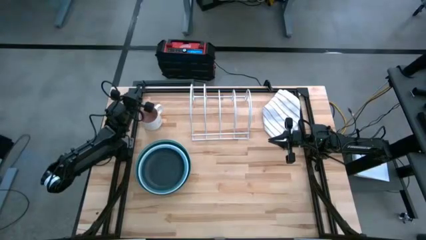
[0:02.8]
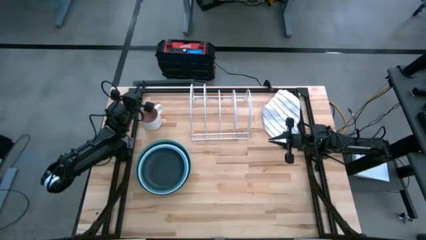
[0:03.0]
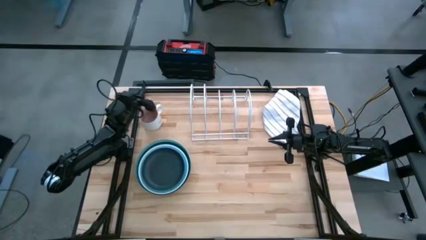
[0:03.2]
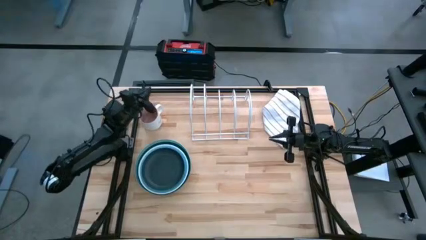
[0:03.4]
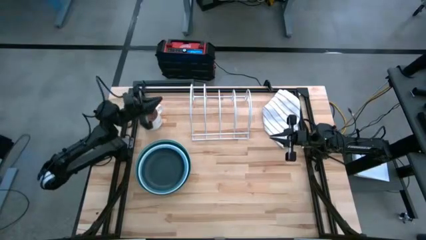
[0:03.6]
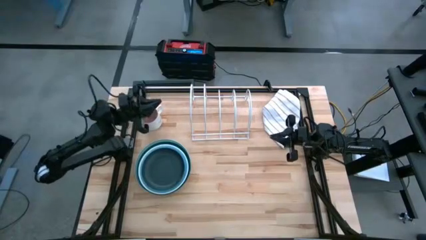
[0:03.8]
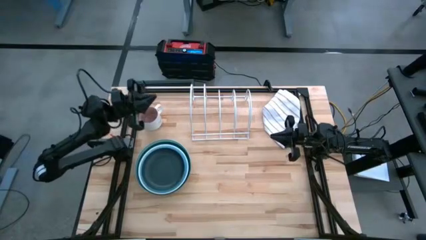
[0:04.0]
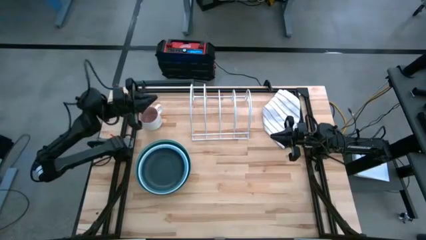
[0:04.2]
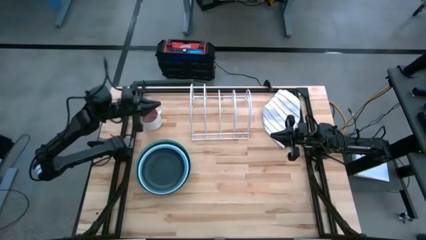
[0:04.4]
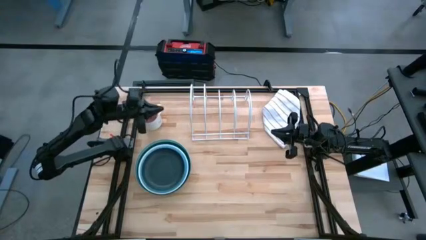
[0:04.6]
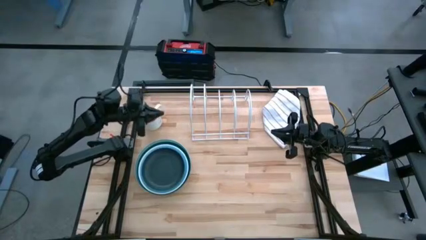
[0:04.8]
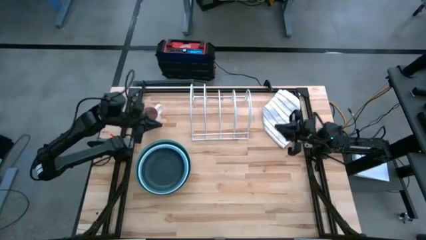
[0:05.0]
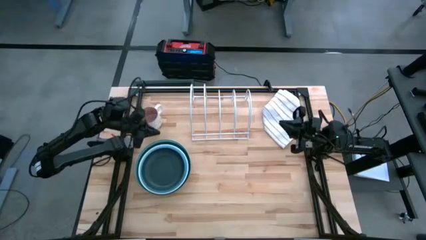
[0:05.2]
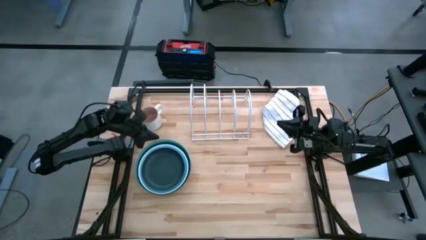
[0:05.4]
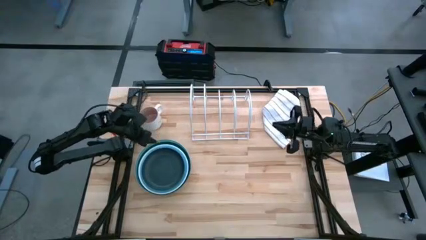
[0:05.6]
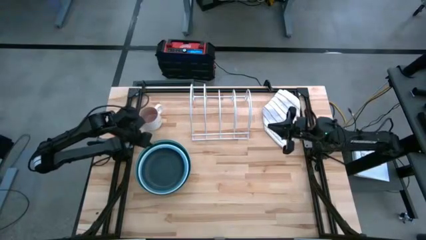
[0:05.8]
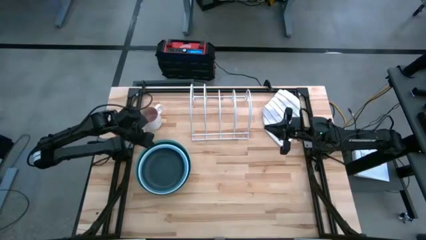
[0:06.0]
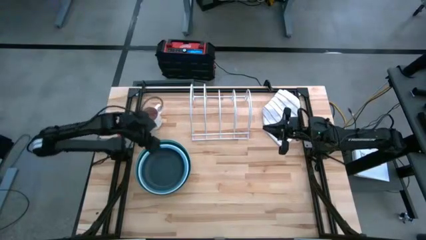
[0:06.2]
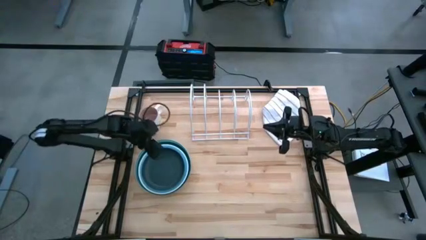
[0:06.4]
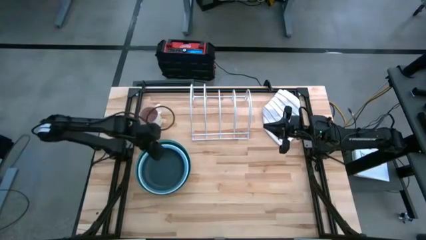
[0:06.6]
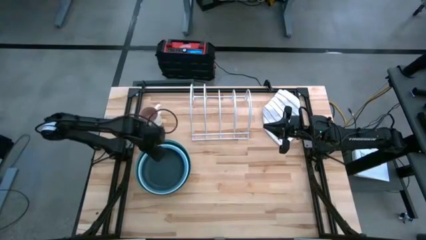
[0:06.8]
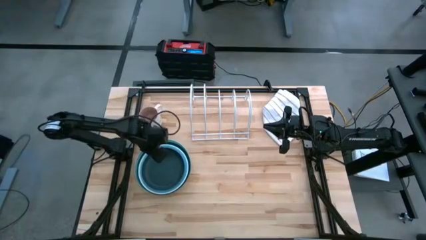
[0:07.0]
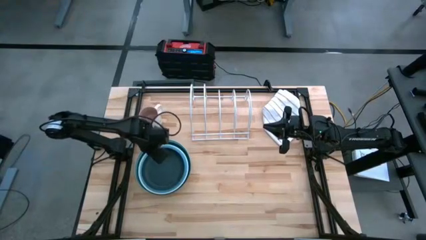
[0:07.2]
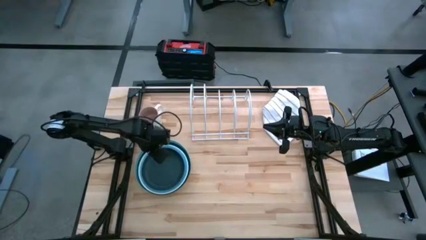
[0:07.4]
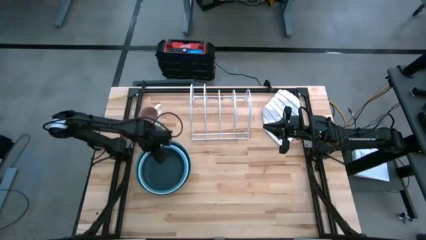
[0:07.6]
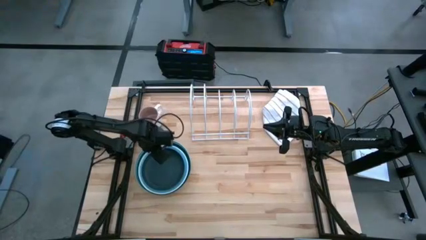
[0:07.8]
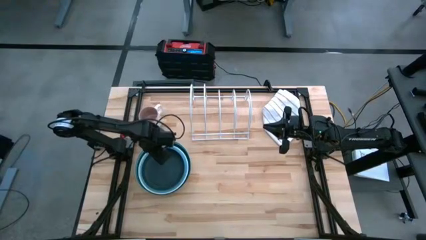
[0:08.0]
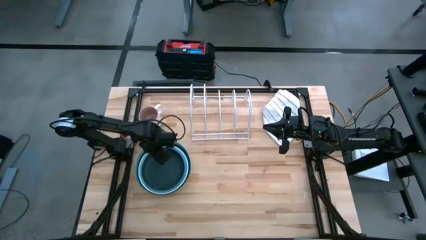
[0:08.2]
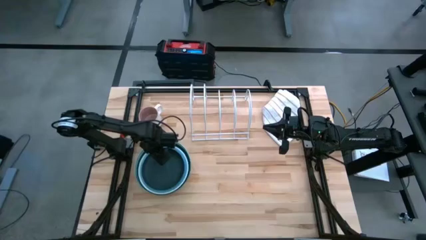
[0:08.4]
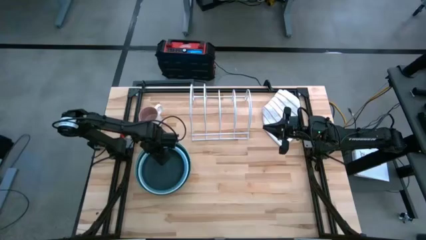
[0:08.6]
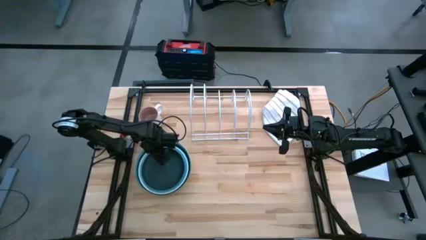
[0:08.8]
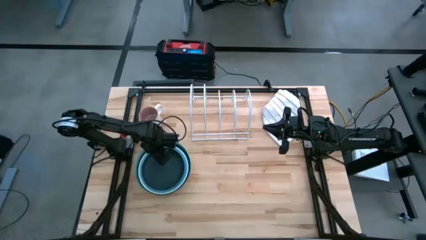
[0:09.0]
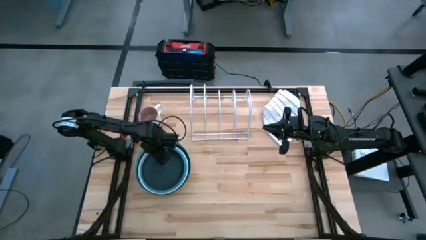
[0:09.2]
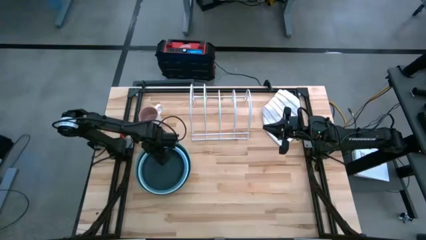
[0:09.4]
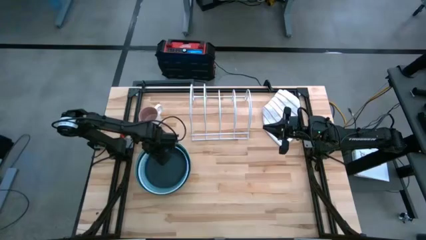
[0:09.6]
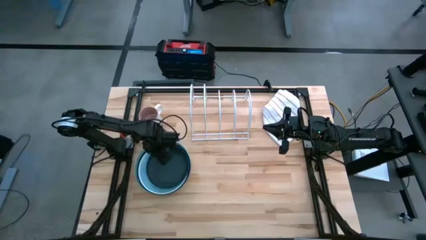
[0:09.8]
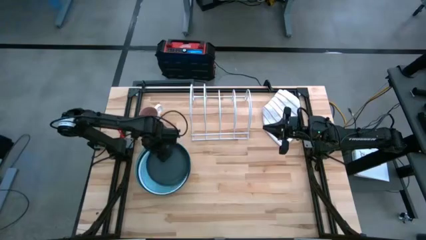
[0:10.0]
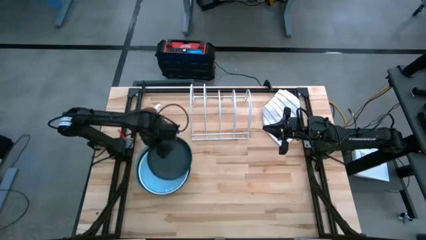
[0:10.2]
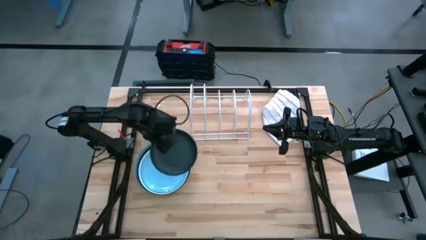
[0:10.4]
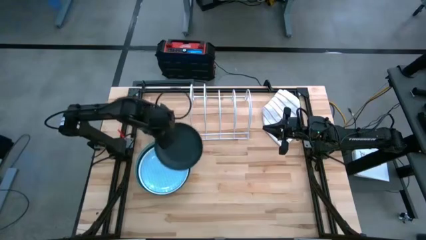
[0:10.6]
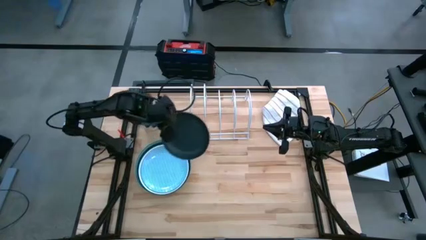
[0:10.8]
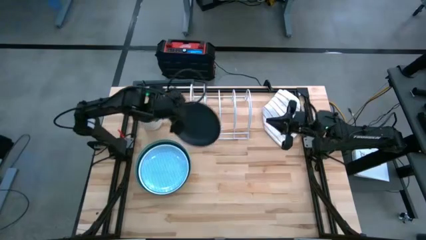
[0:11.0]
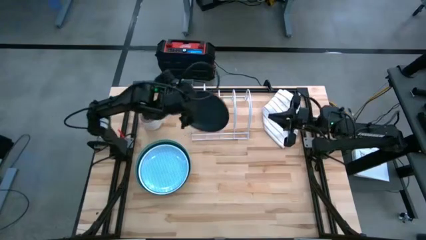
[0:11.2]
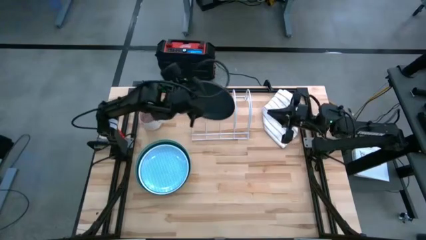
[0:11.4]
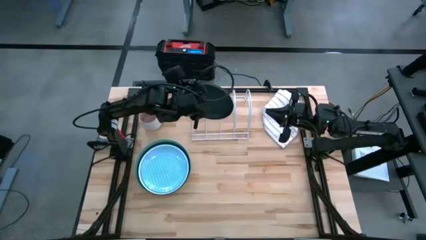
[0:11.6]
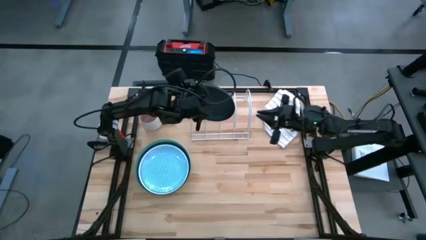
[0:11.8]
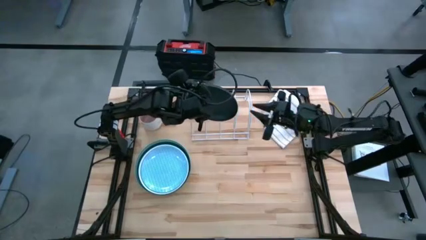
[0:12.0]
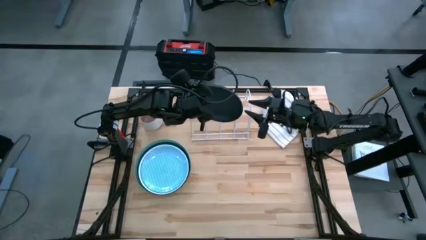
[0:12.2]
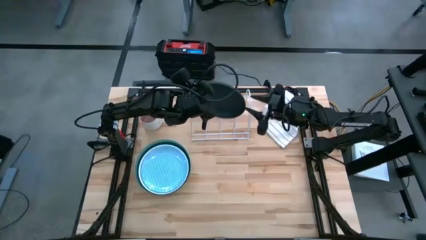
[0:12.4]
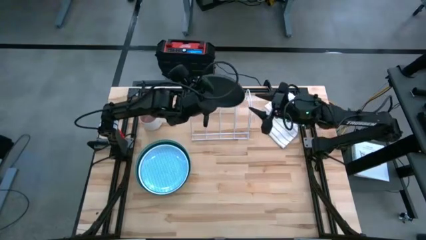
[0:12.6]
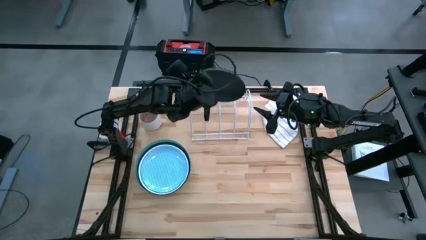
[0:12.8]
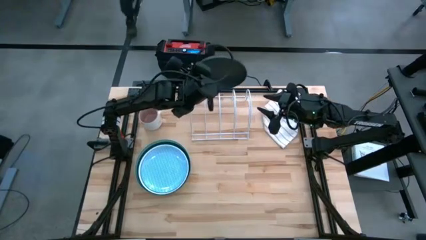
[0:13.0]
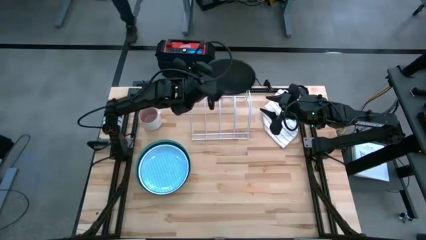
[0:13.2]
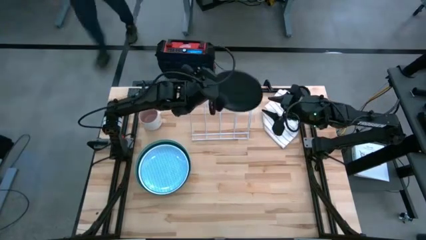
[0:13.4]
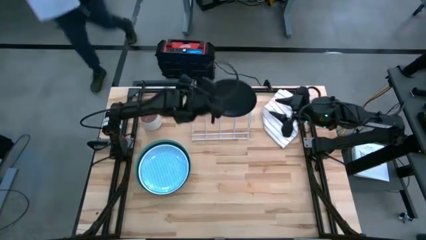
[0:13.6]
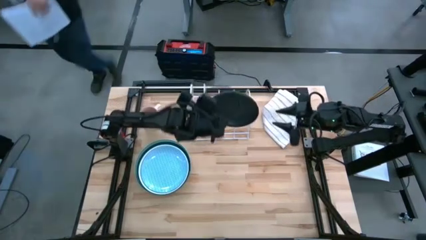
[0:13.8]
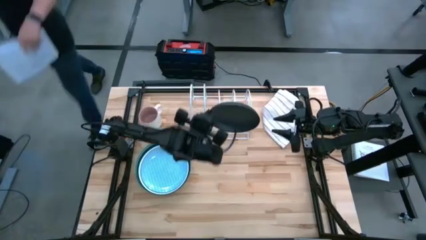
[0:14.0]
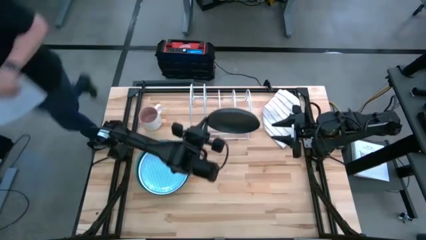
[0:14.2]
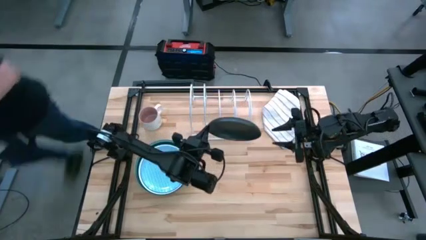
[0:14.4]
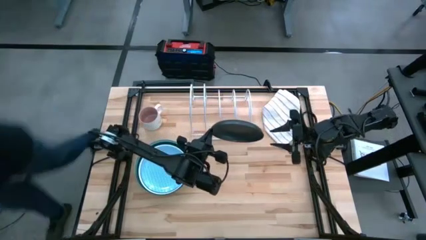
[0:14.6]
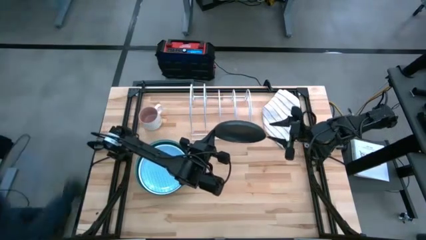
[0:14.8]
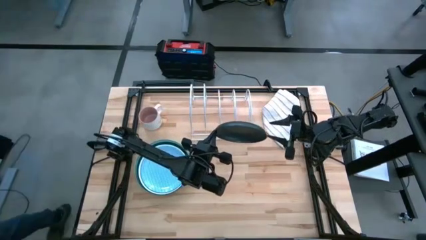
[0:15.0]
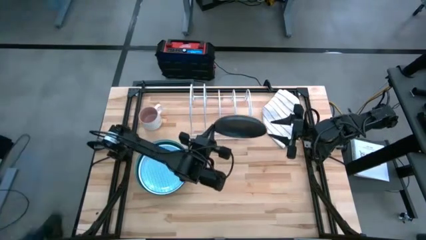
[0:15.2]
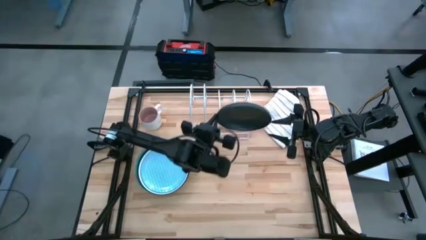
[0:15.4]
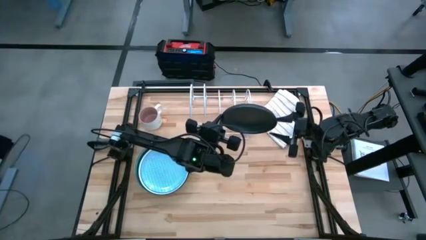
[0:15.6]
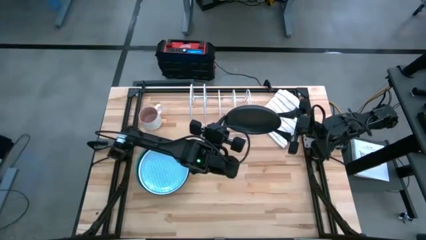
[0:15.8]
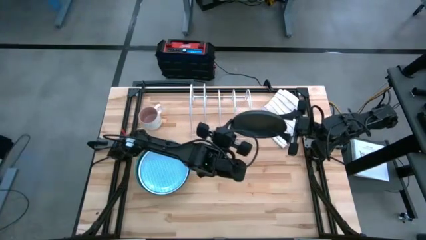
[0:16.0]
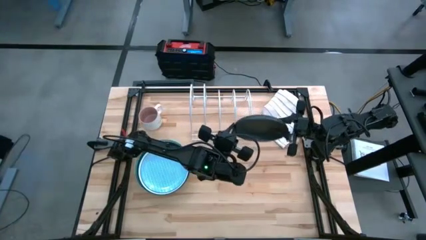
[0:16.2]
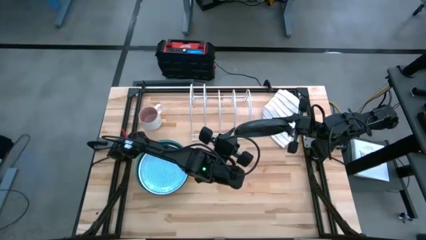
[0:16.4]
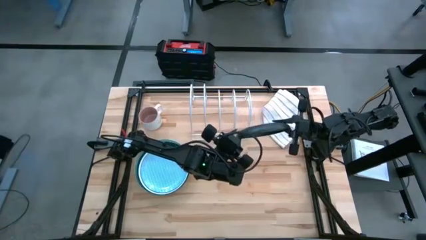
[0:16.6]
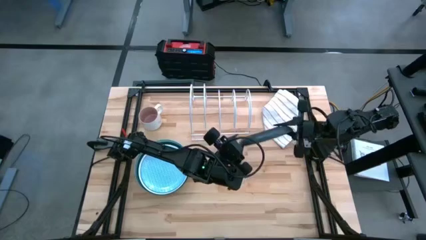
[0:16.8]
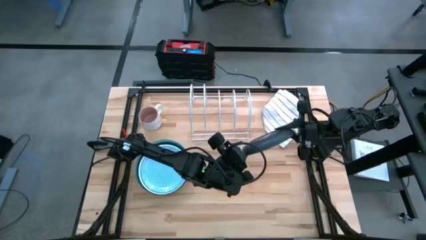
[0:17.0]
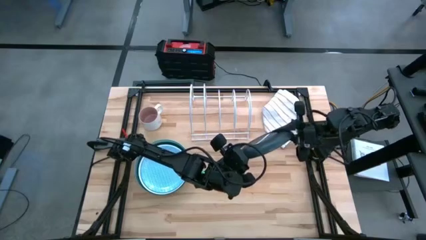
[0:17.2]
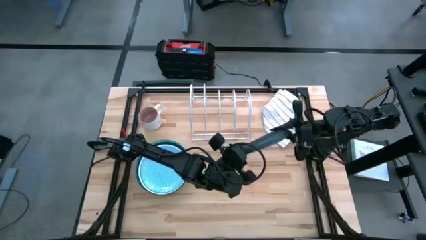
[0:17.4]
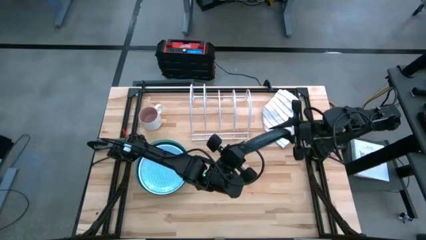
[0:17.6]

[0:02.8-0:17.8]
Task: Sort dishes
Put the black plate in the dishwasher rack
